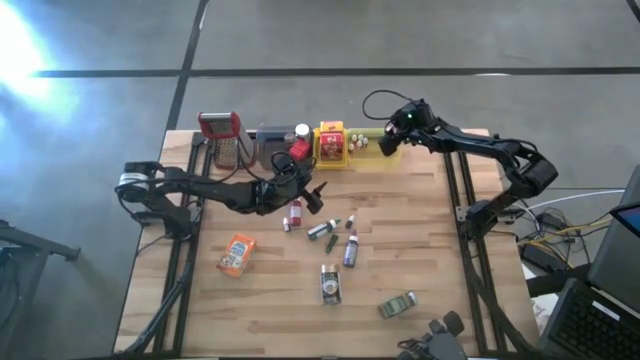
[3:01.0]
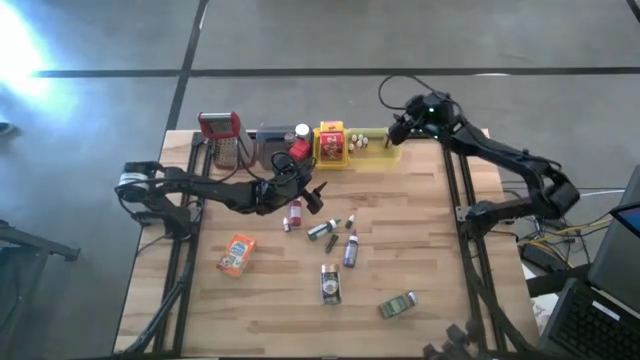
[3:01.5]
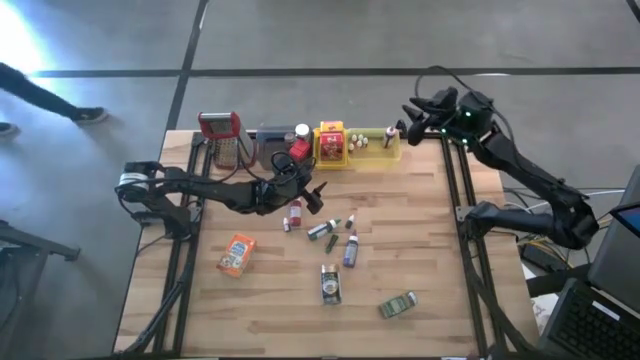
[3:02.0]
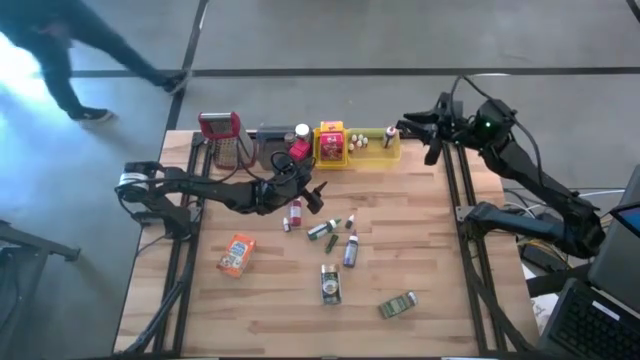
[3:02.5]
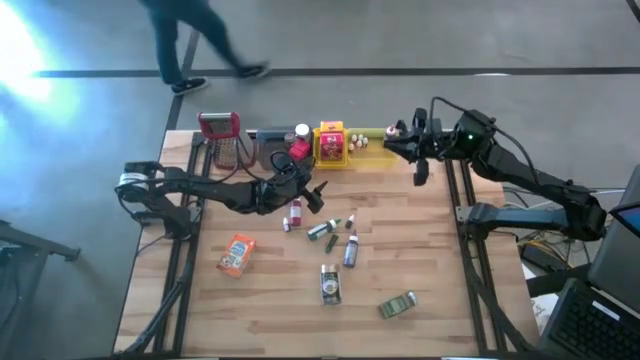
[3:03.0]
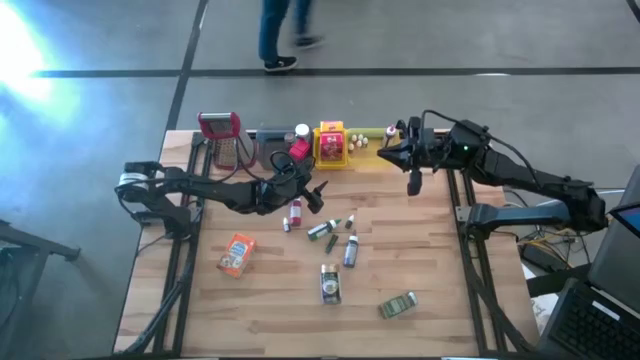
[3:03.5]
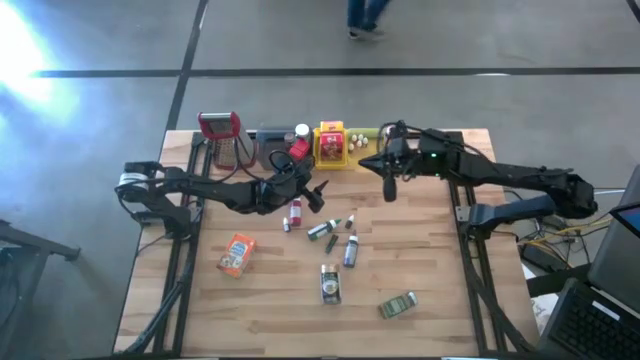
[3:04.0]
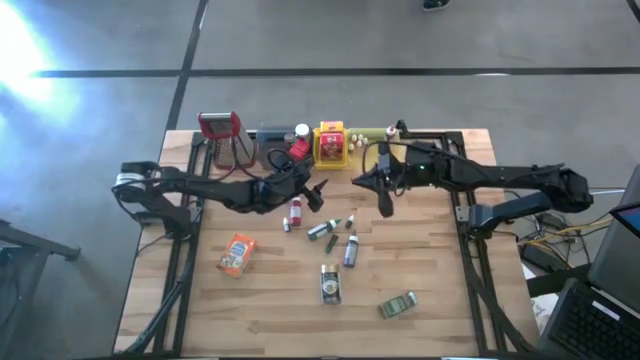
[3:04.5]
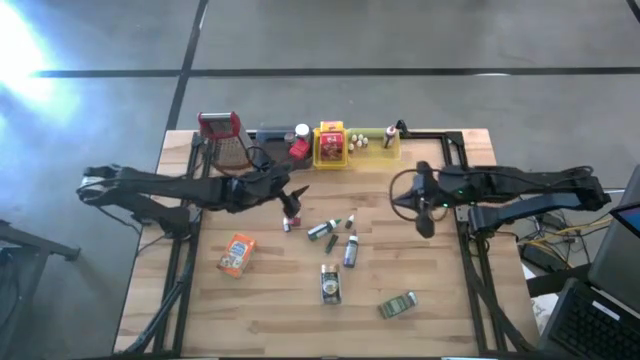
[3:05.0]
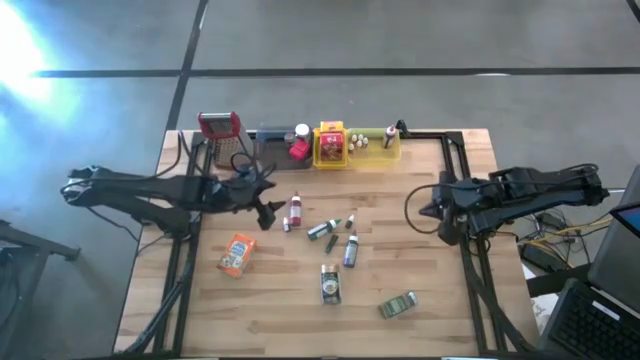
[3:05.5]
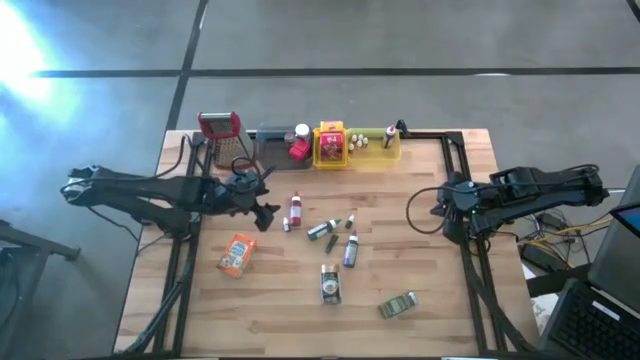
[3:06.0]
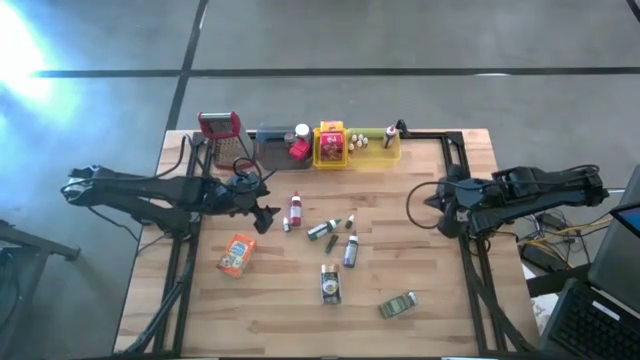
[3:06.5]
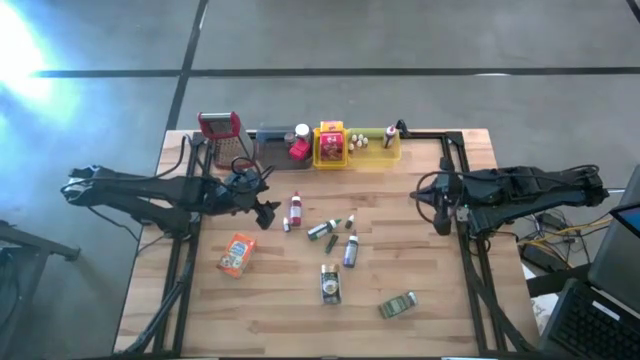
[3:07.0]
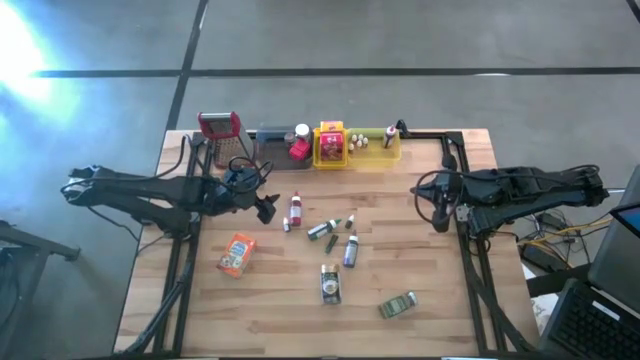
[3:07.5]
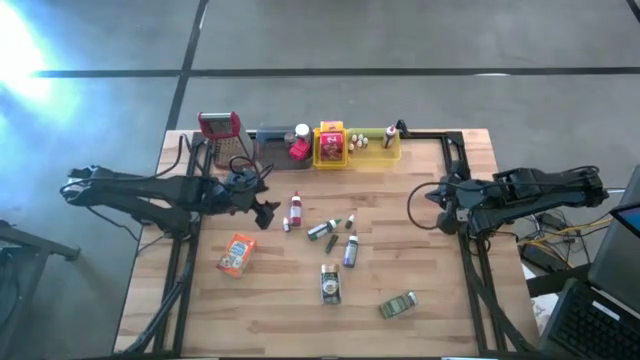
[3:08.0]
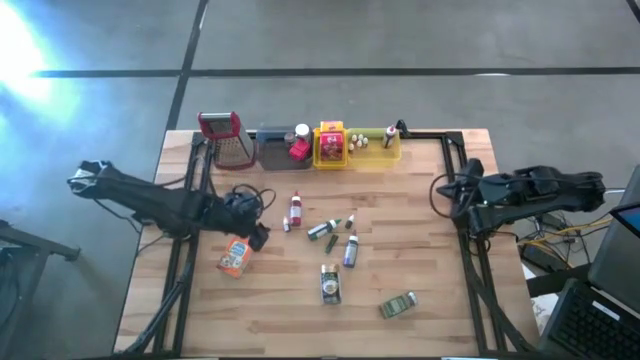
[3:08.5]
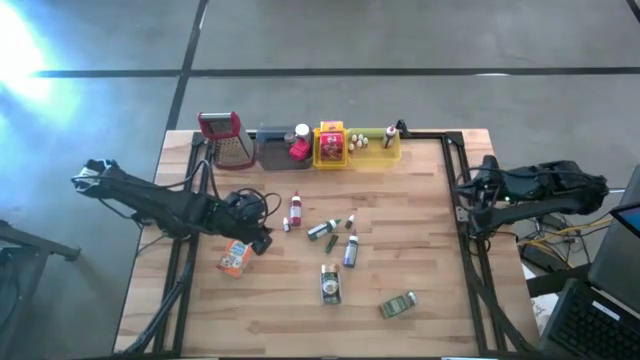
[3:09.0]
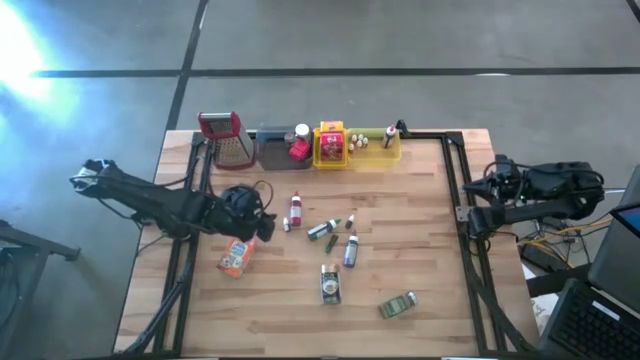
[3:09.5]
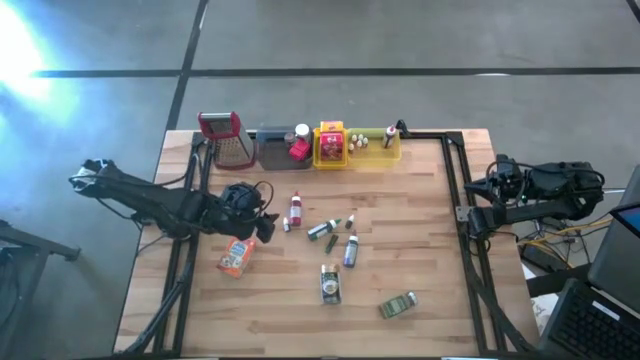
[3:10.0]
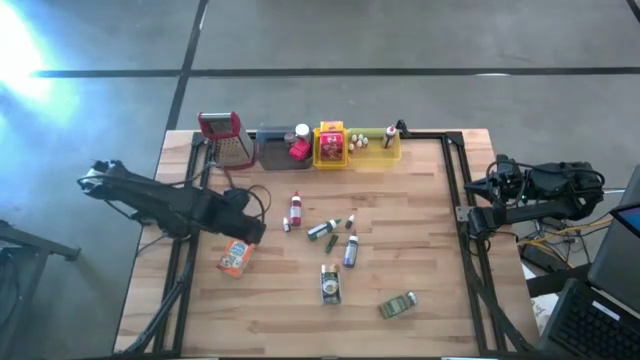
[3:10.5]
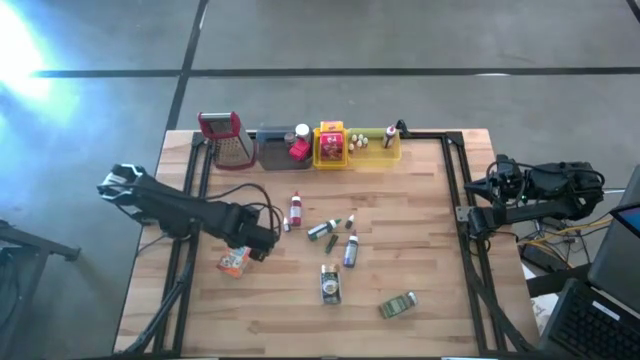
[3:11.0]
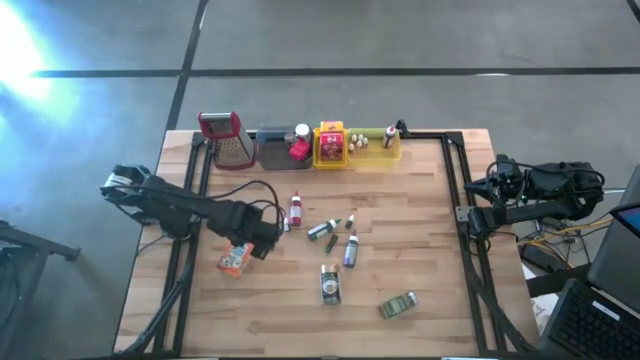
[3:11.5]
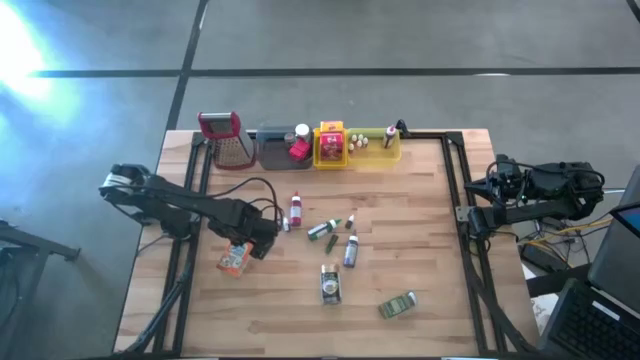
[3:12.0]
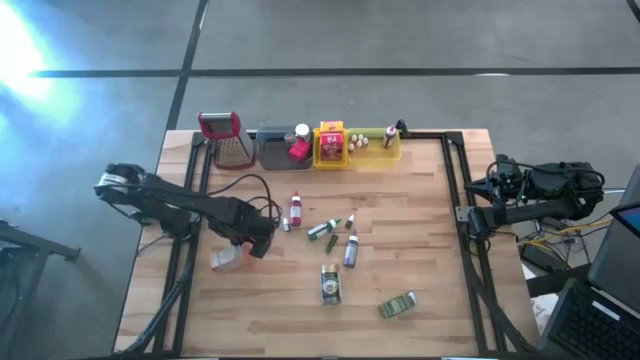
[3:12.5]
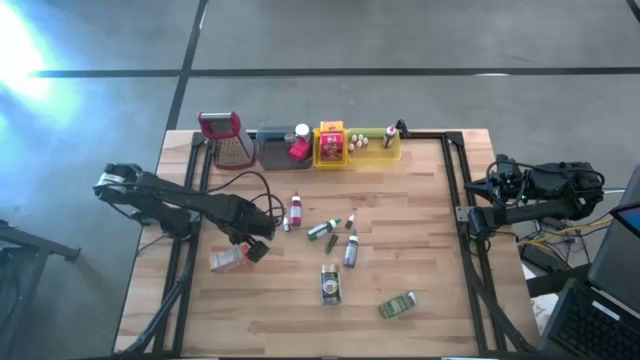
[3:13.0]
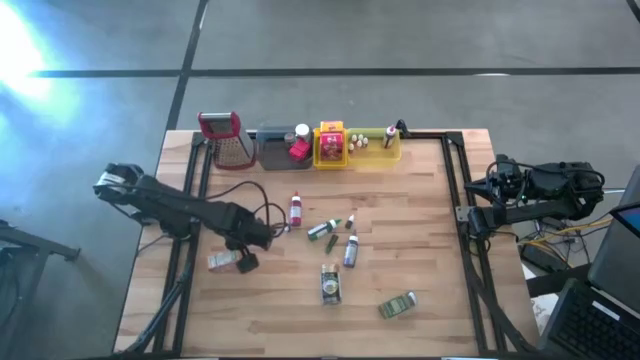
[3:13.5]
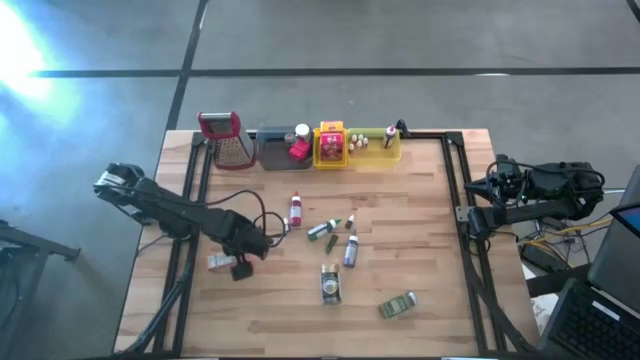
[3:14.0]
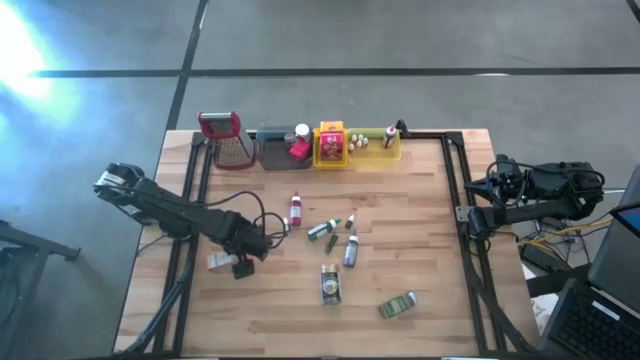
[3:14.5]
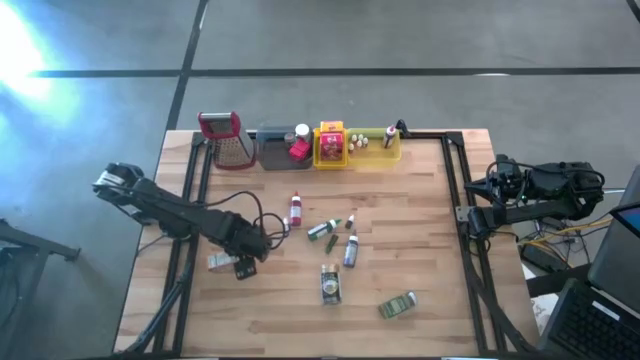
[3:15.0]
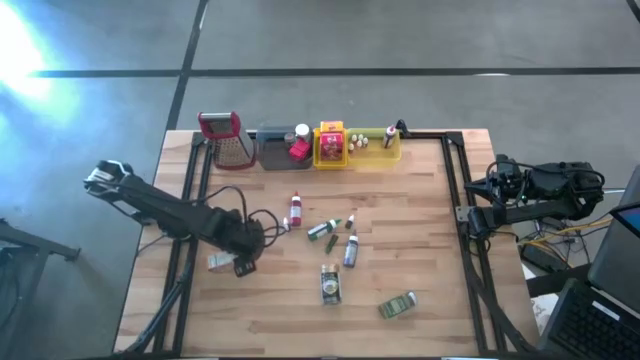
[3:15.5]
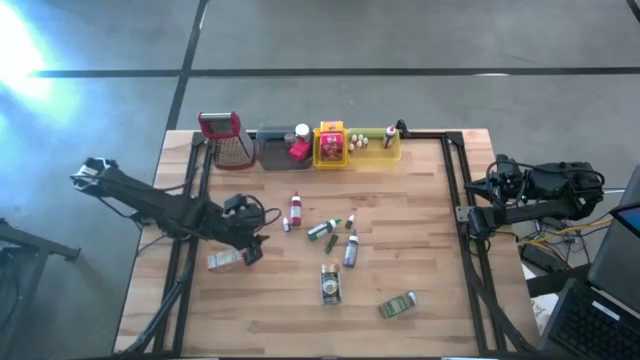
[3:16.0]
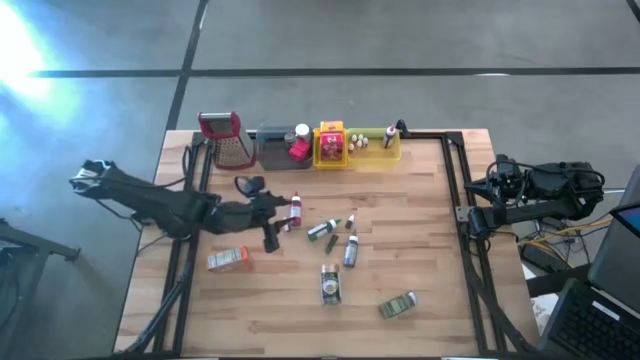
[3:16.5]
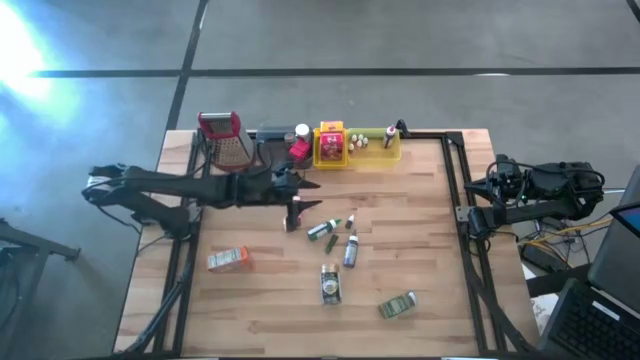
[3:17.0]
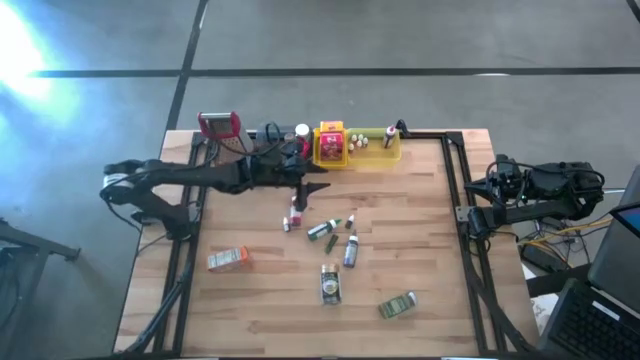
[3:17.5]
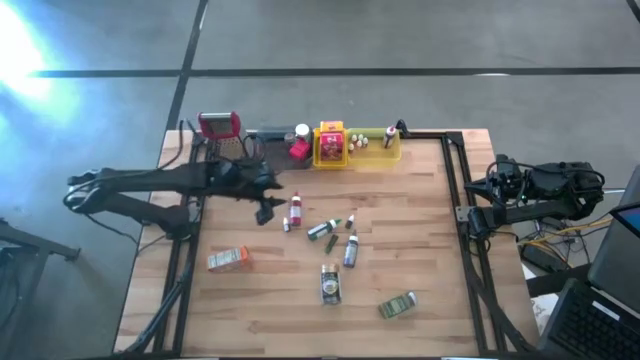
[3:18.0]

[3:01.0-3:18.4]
Task: Pick & Place Kitchen Items
Put the orange cereal box into the yellow bin
